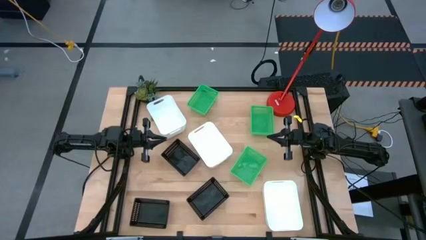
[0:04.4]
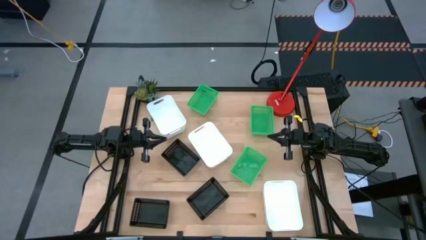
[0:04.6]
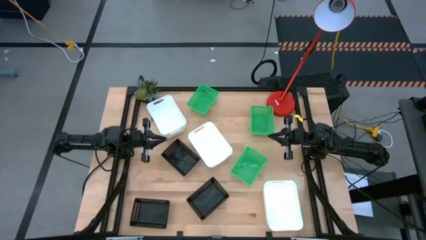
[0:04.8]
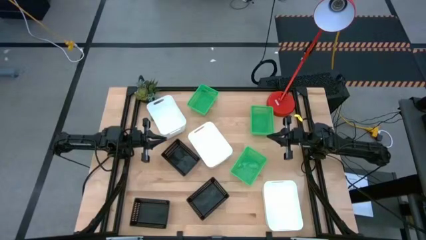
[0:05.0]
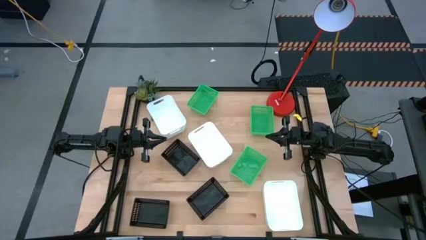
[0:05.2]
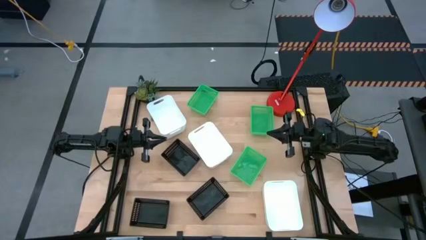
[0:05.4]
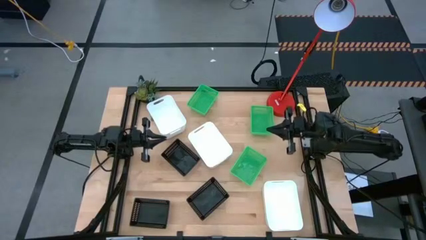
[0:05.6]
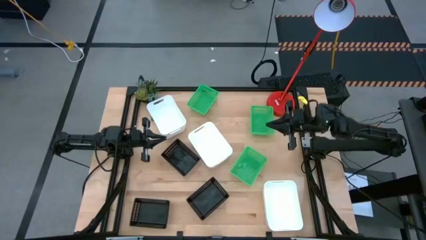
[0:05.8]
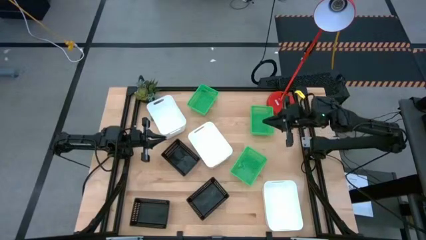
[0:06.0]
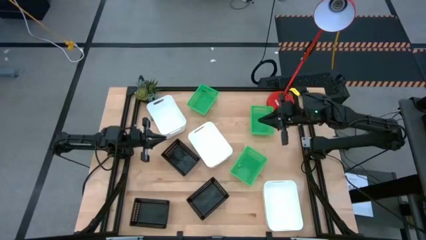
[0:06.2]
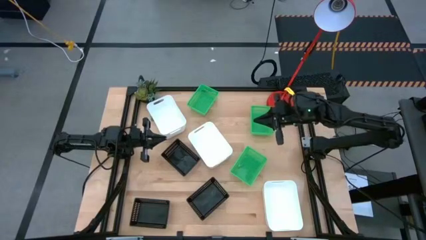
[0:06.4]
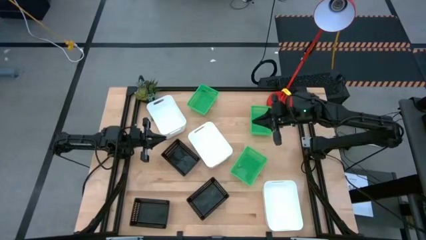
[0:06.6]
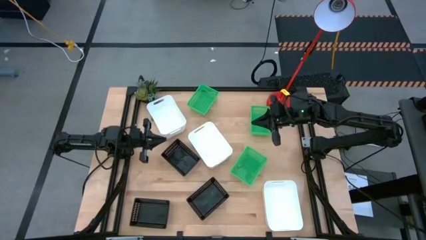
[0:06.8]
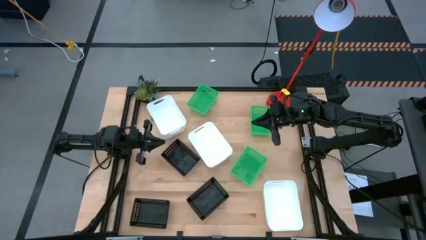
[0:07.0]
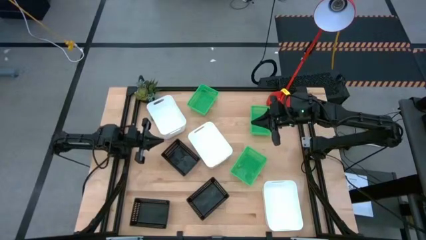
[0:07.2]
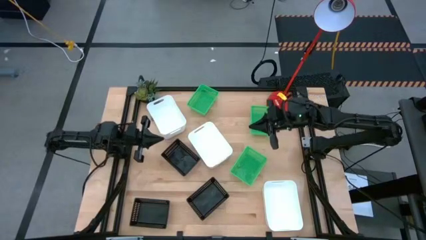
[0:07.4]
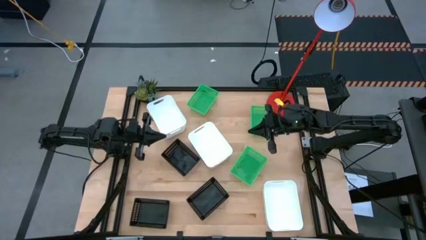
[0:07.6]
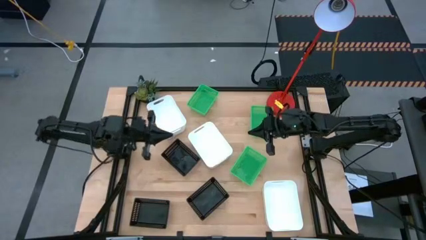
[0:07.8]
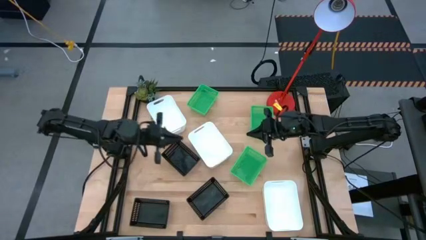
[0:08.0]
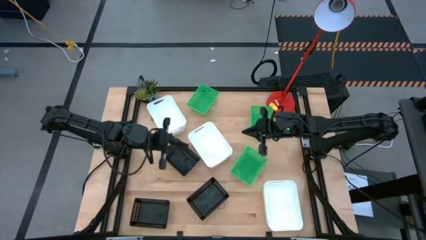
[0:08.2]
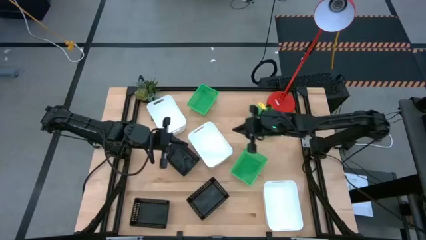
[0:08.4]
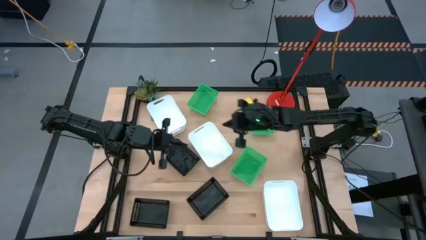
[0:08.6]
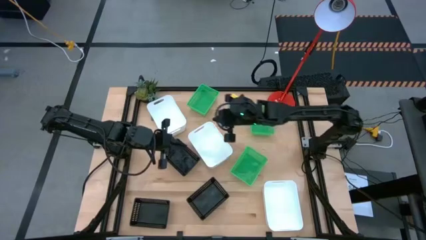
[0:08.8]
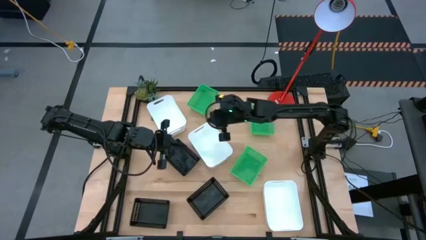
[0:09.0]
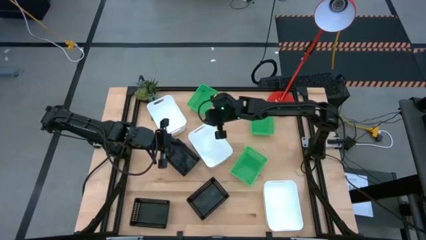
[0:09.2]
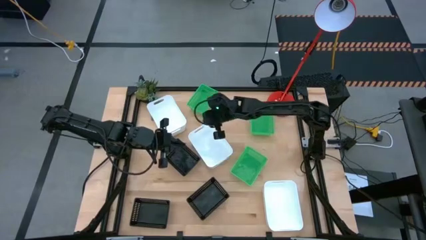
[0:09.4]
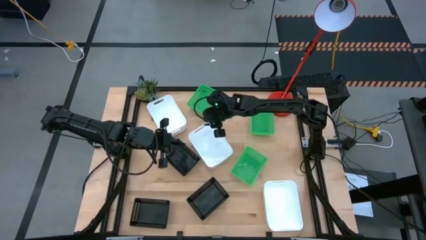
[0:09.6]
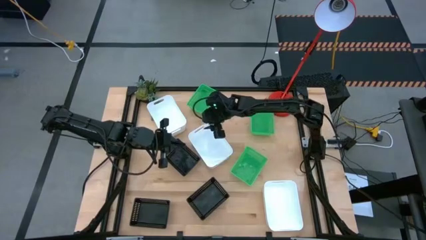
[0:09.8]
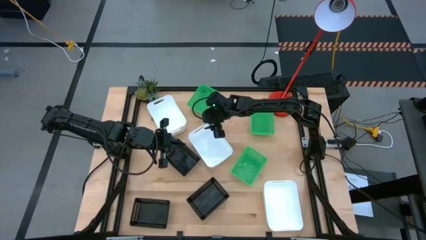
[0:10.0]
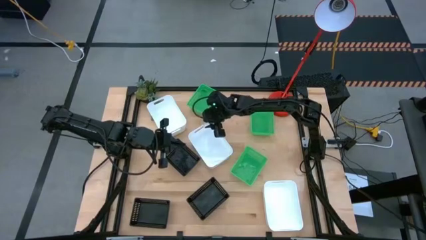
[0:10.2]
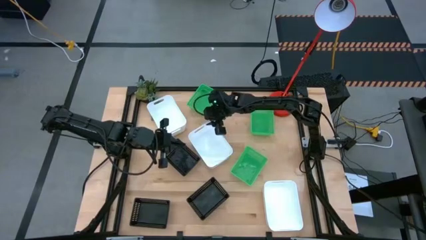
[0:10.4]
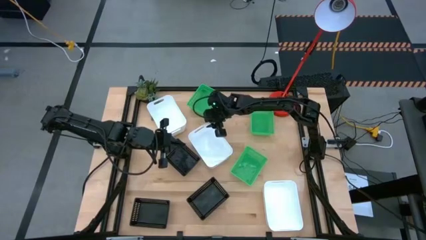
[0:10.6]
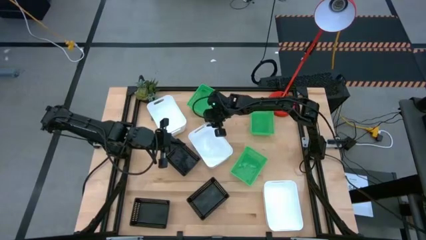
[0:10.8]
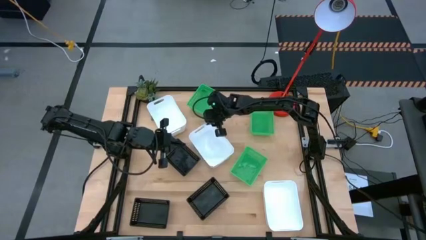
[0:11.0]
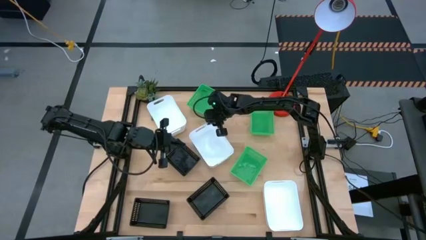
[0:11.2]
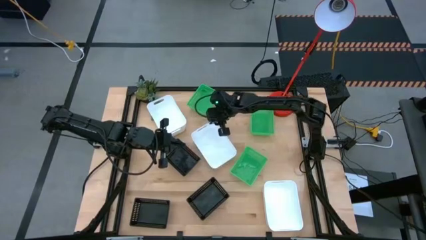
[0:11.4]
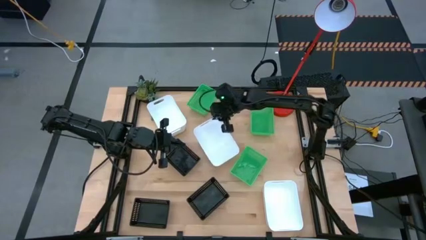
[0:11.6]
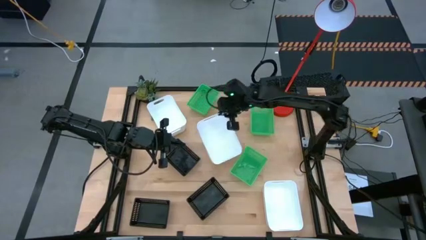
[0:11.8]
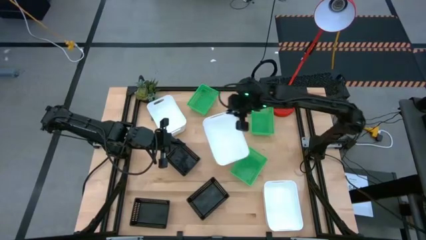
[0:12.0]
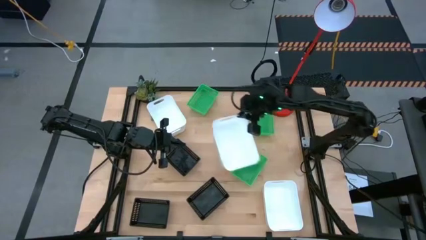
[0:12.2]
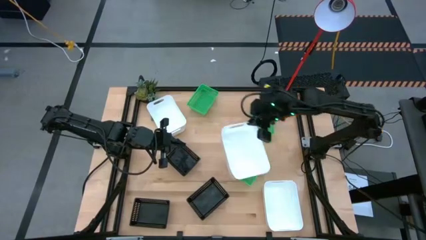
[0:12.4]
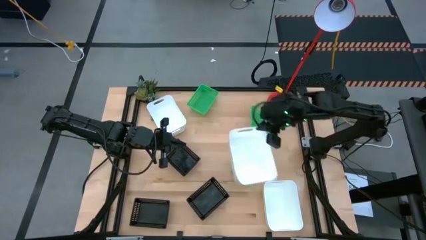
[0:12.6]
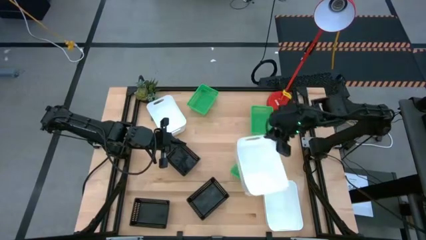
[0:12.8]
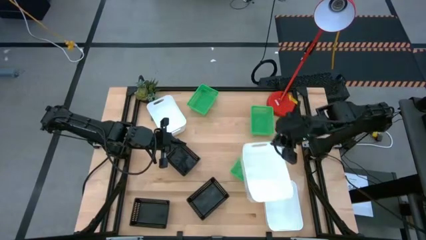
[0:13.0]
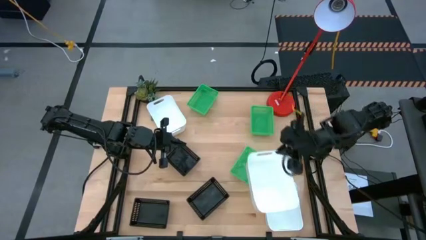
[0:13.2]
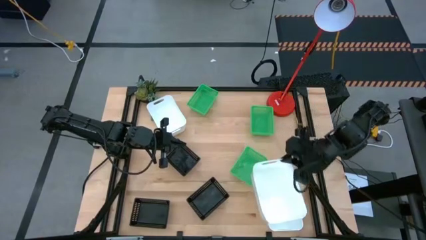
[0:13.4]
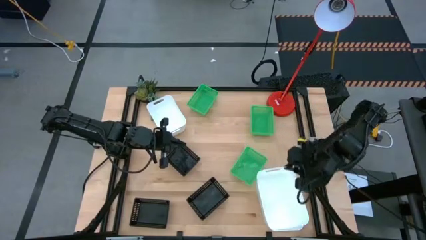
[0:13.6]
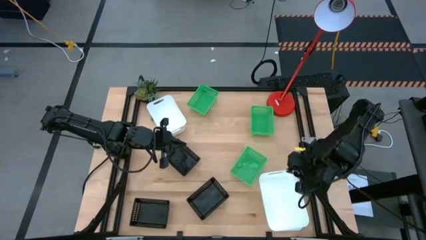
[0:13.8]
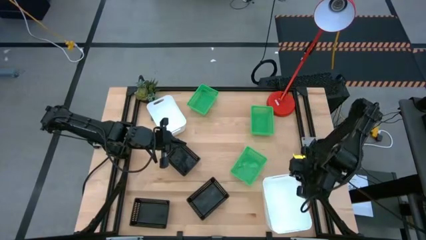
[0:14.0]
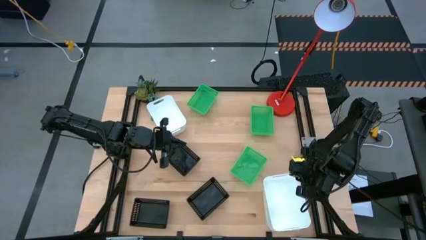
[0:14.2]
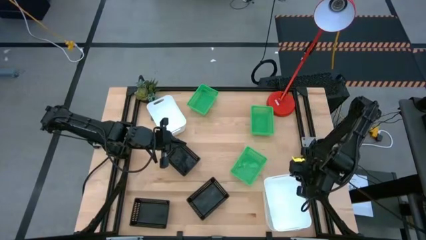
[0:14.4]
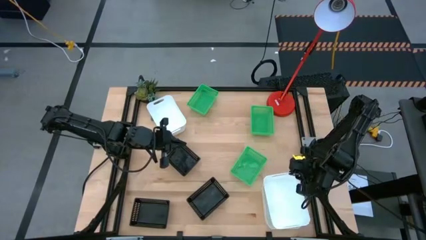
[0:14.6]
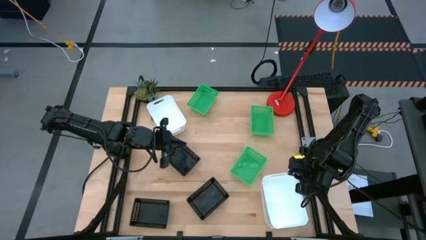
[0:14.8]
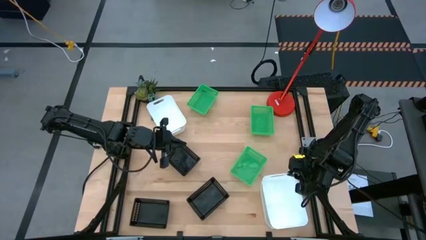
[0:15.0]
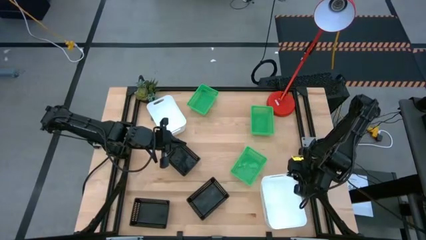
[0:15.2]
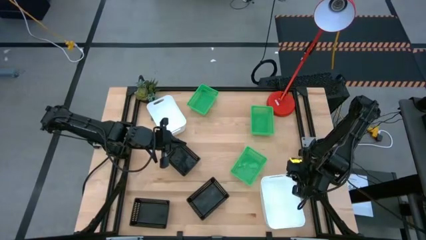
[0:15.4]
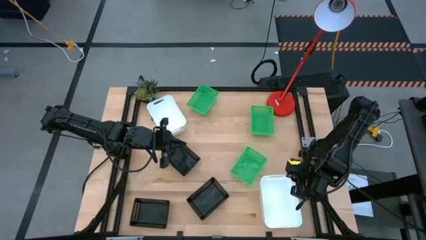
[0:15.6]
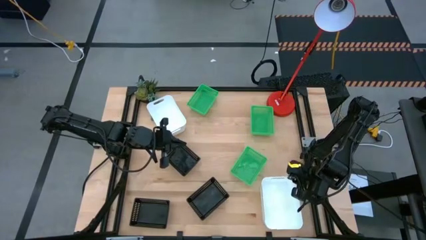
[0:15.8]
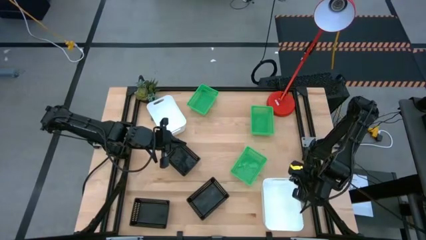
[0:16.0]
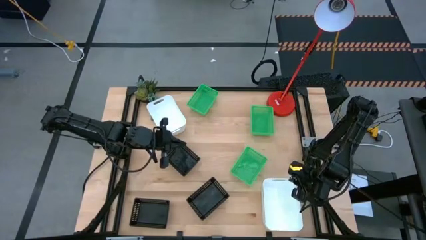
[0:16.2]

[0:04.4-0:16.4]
Stack the middle white bin on top of the bottom white bin
